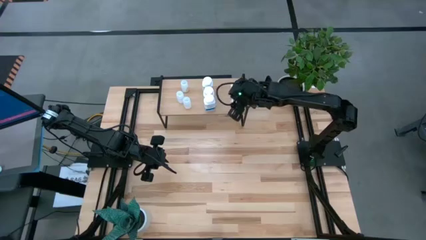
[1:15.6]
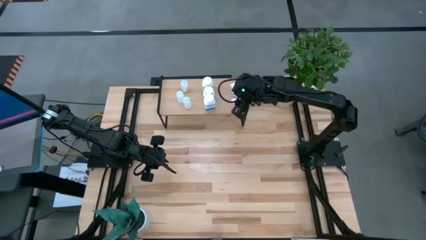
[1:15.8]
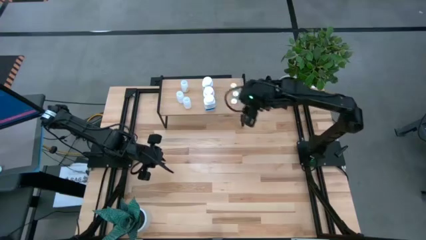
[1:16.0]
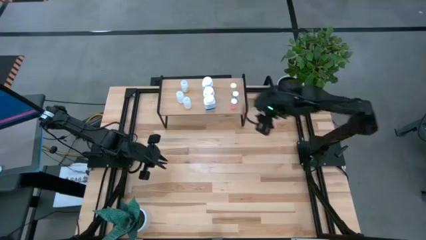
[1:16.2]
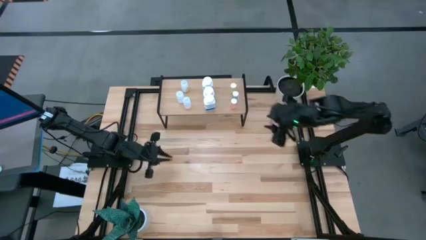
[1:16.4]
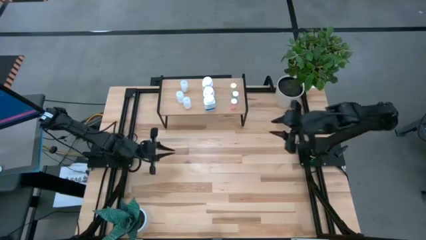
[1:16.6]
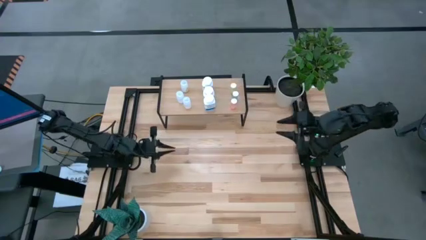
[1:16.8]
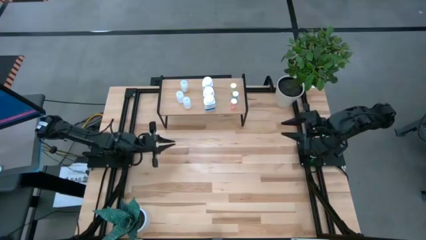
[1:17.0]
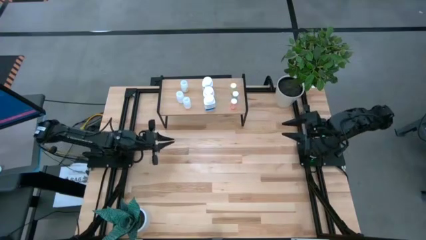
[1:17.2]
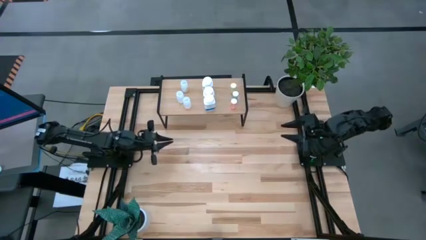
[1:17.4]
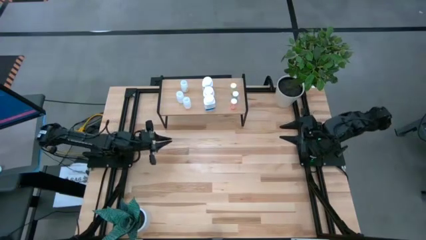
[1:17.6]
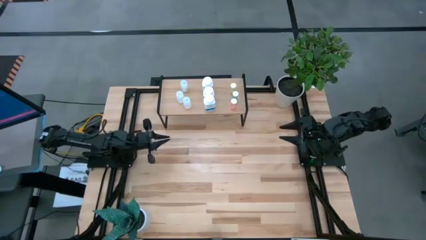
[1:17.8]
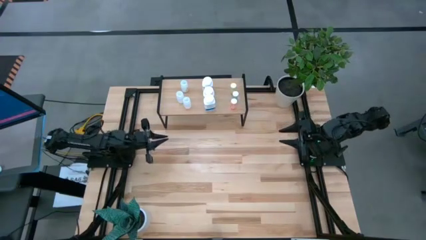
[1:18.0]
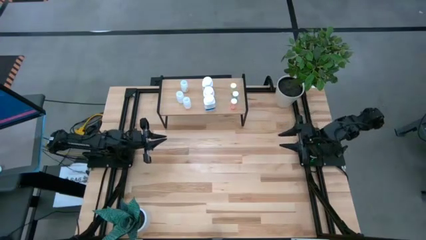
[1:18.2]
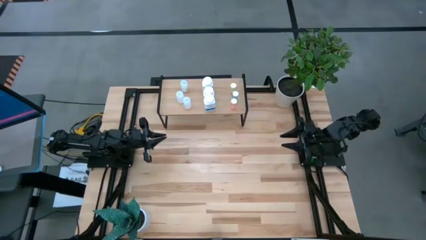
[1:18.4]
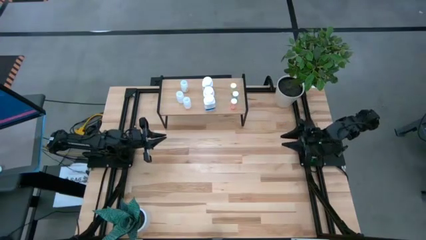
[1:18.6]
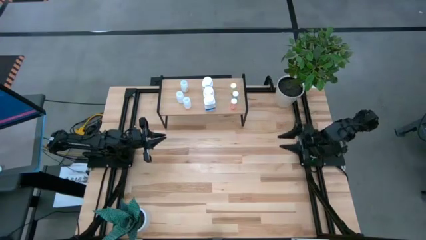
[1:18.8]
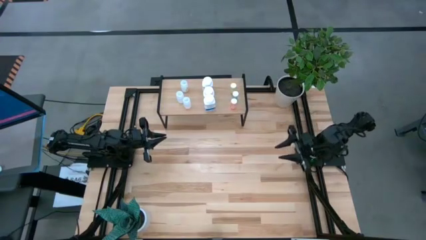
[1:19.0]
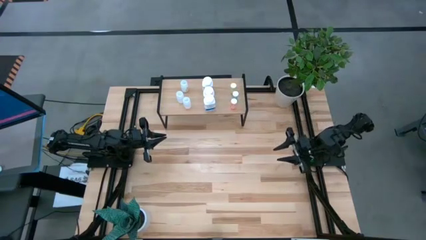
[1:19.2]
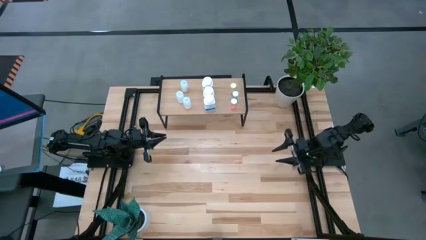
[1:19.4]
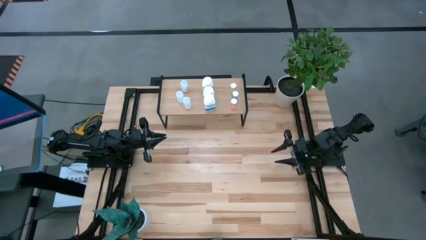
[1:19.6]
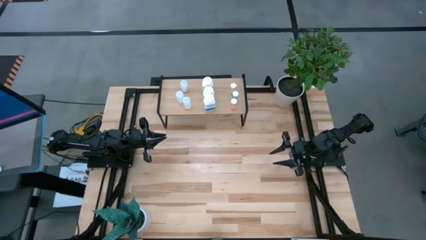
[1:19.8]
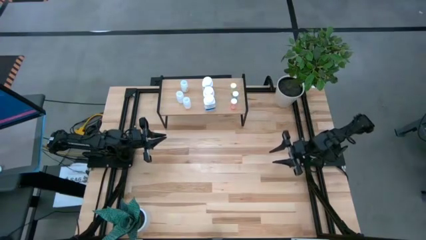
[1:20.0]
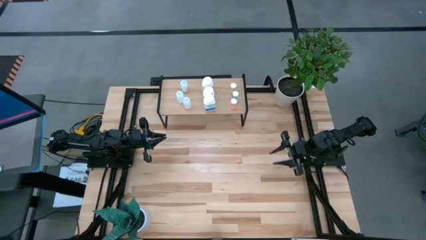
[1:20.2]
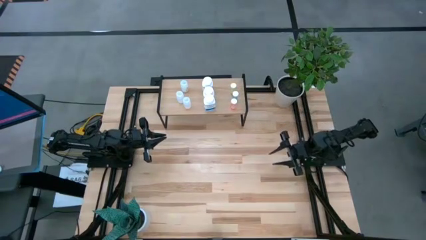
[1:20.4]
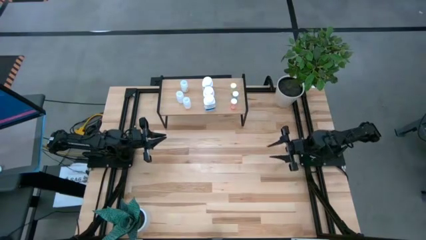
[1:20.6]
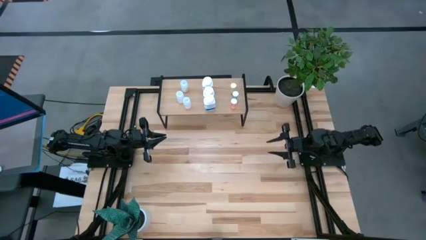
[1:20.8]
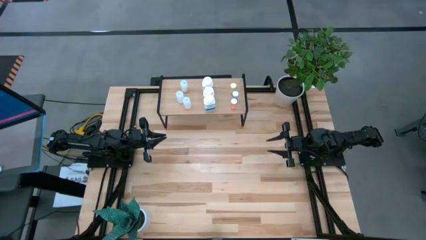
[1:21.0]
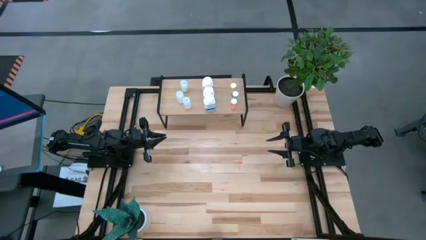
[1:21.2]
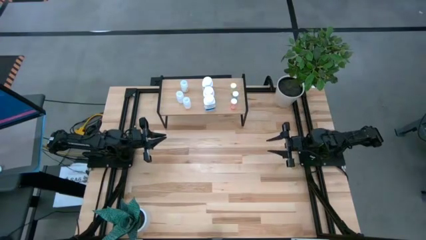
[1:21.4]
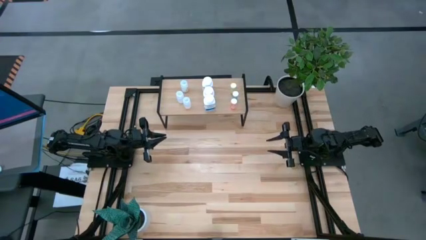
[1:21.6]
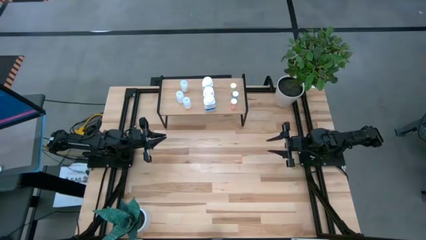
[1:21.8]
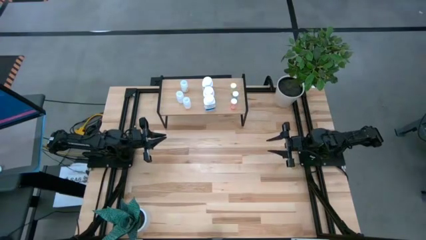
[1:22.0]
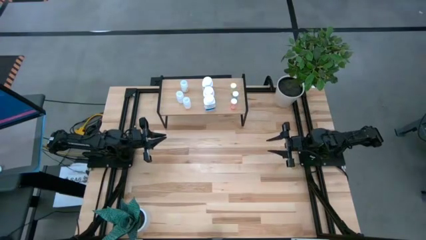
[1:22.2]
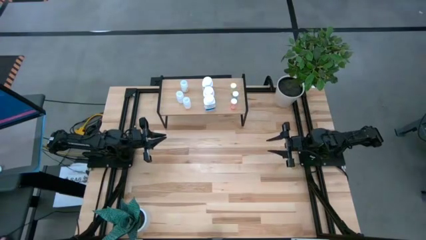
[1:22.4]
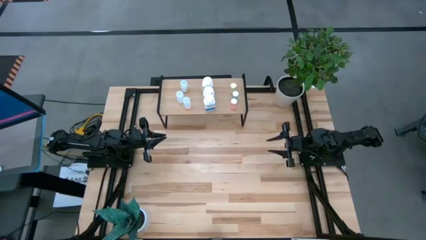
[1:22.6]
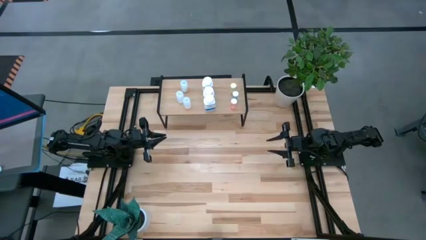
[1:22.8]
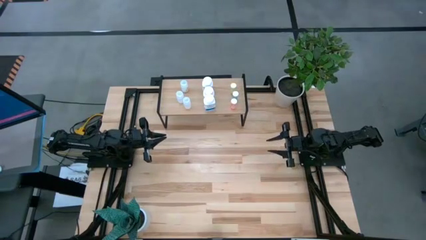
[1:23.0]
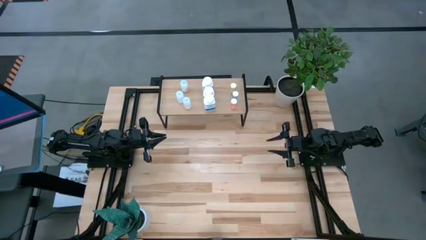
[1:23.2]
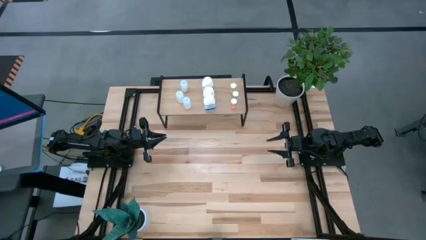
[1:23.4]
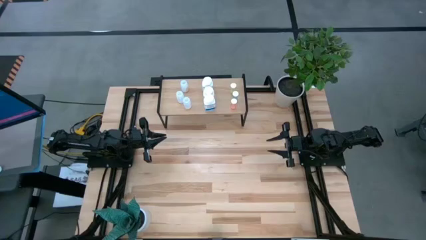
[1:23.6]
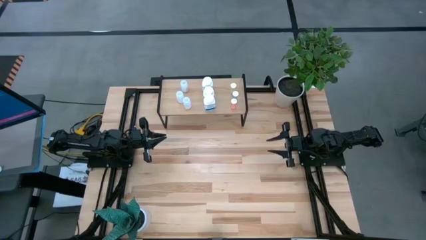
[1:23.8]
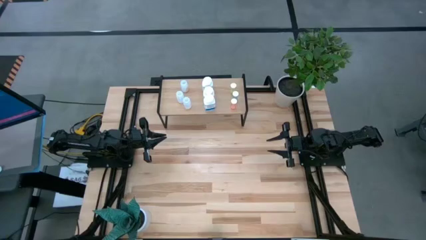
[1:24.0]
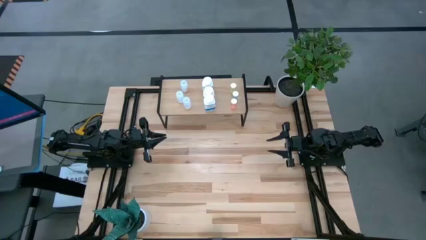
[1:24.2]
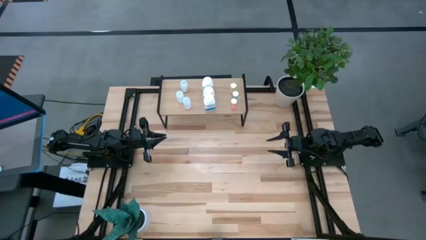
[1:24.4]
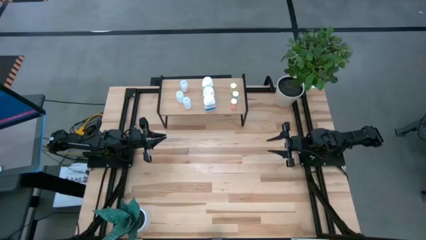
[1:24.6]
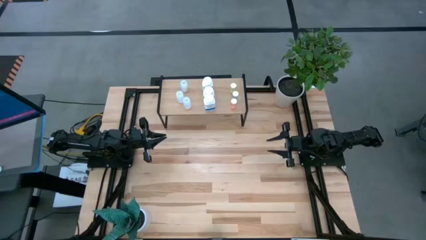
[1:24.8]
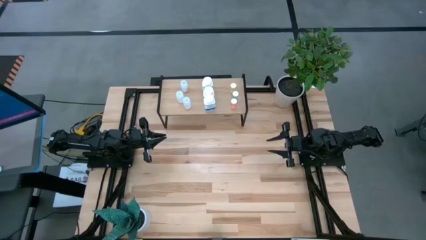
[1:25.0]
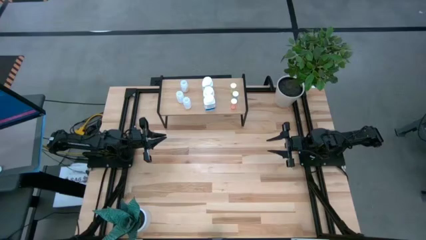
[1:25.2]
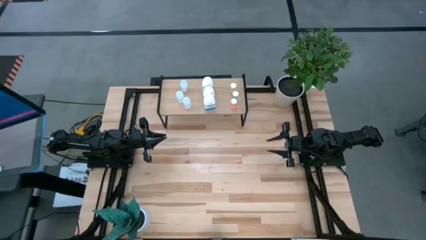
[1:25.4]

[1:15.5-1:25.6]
Task: Pick and place medicine bottles onto shelf by color
Return to Home Position

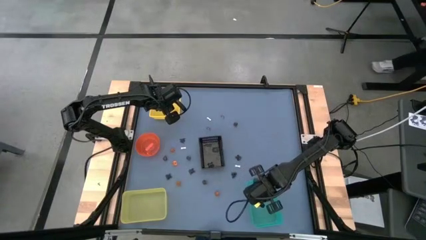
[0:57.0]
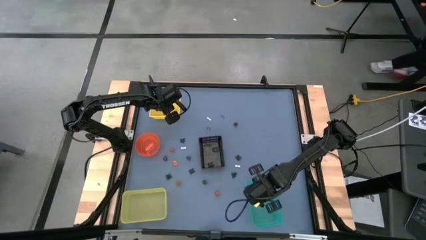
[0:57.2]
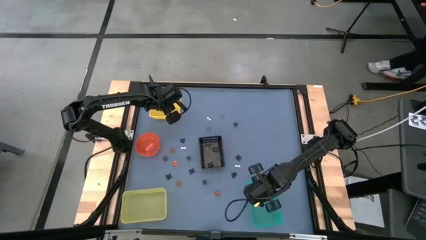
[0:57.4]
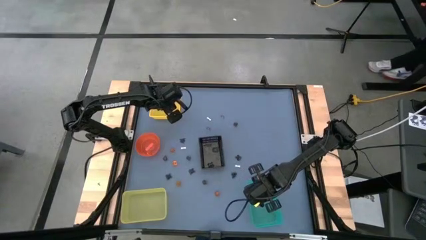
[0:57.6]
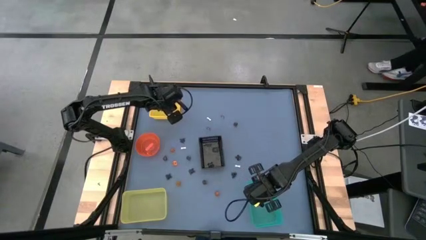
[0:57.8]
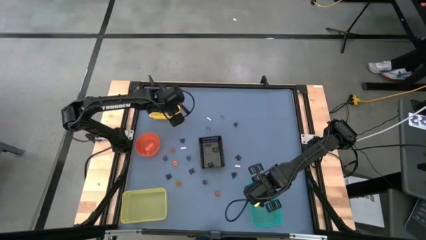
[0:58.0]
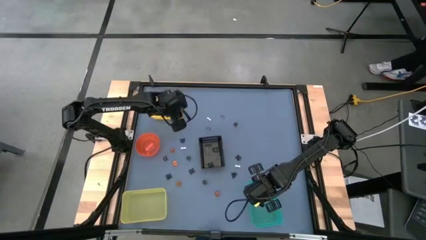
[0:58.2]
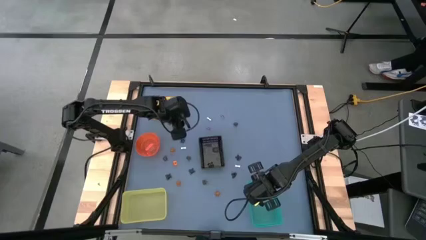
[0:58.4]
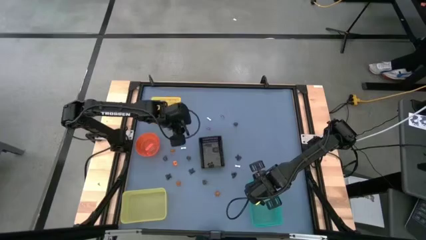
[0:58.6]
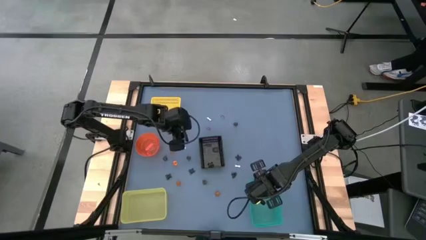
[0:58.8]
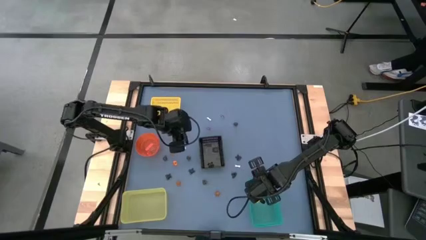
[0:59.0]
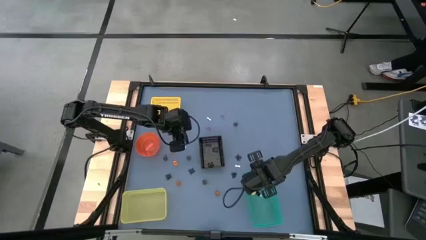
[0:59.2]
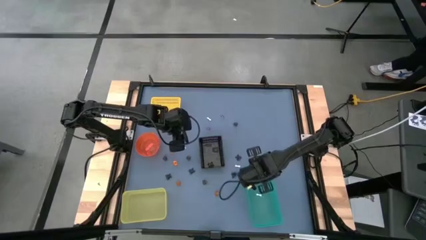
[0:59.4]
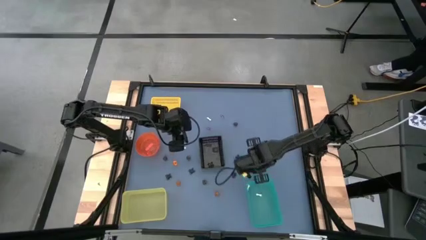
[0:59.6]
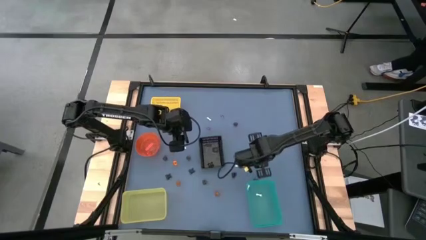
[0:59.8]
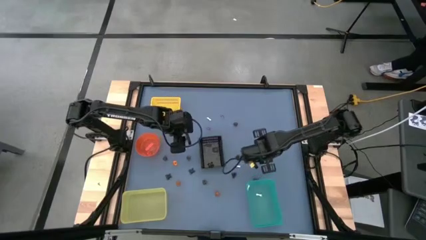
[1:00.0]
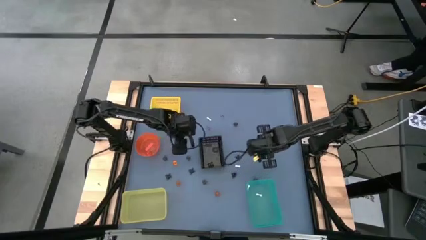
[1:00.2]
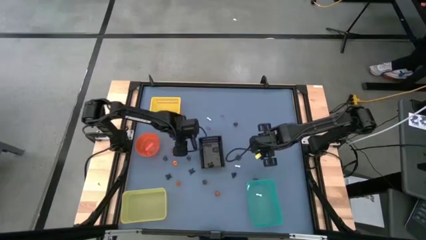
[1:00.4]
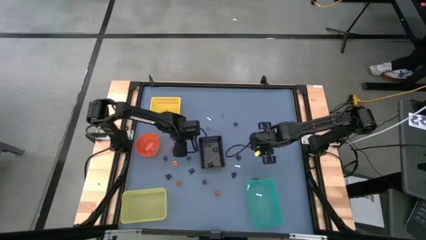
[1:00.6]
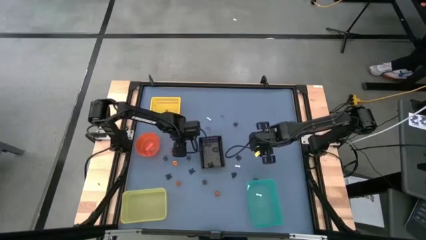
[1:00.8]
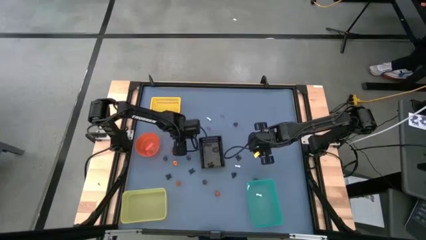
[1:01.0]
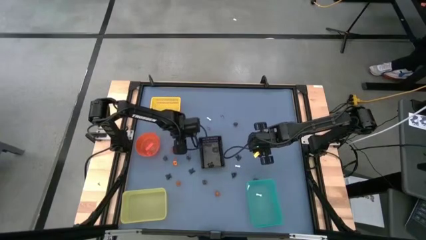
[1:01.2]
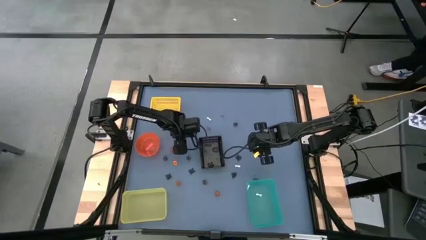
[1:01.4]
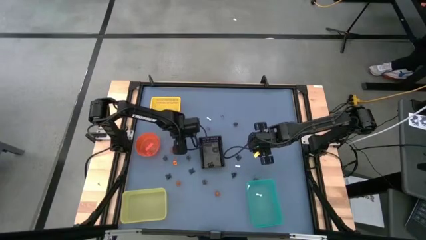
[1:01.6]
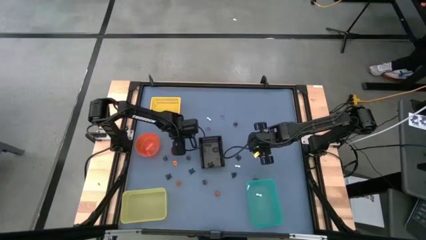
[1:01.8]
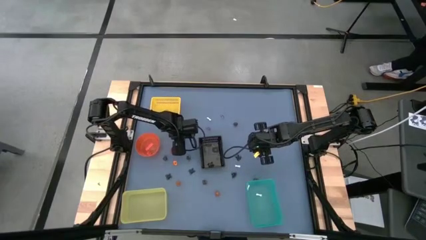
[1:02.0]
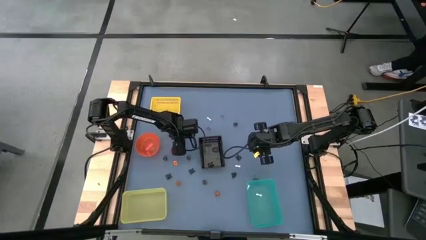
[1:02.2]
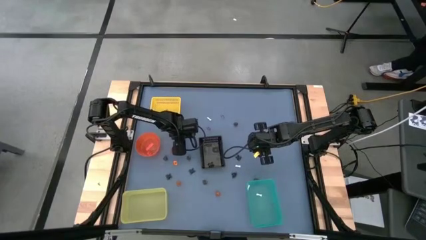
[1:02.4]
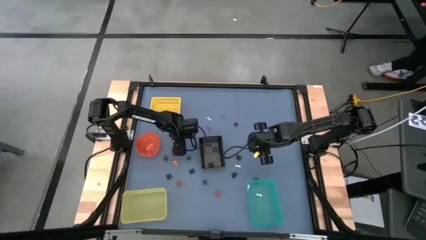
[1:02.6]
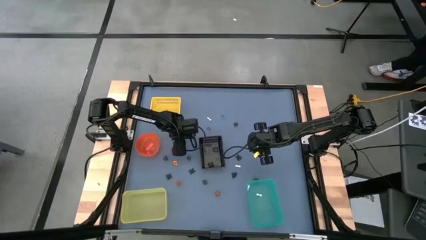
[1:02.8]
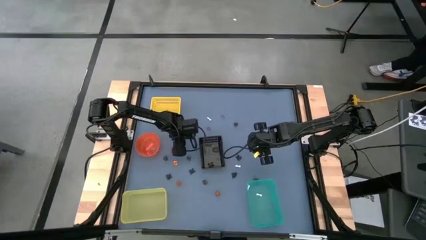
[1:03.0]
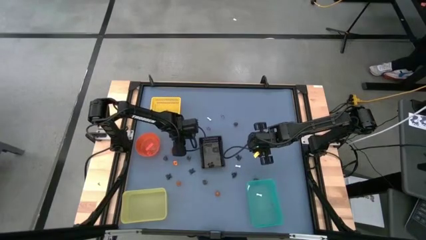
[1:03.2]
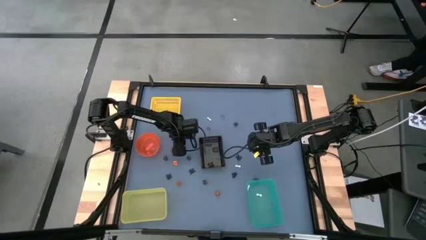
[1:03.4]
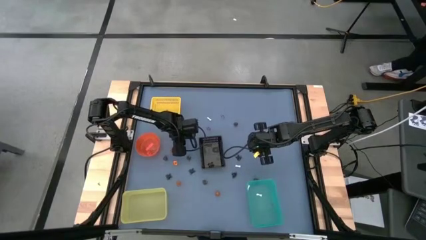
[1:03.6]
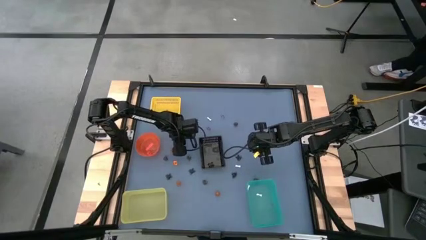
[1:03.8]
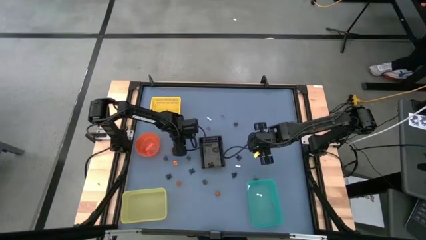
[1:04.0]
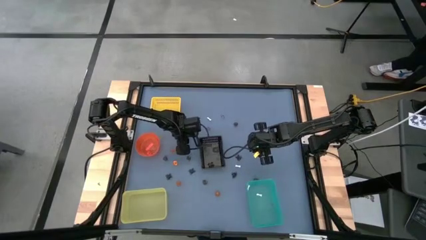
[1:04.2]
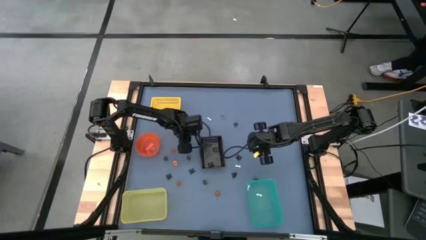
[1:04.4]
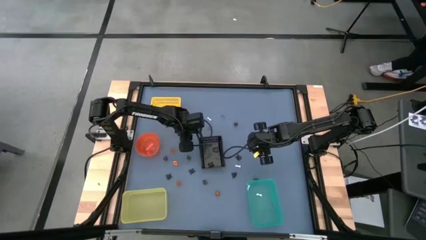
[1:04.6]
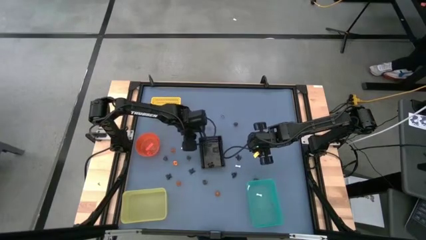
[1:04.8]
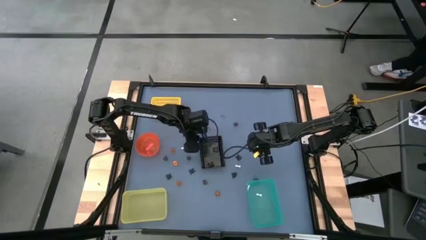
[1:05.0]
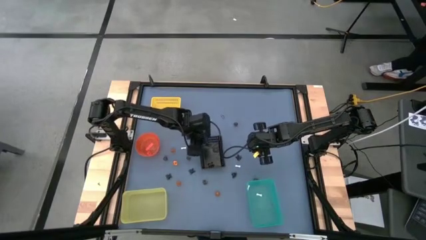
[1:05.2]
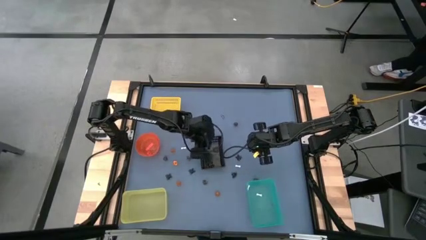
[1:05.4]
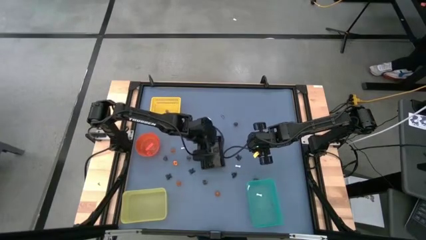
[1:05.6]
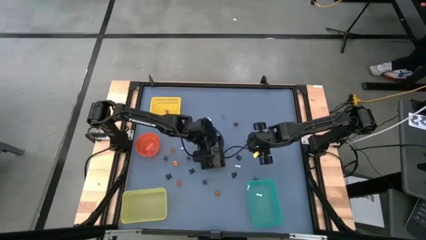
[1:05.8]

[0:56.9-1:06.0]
Task: Sort Halloween decoration
Put the black spider toy into the black bin
